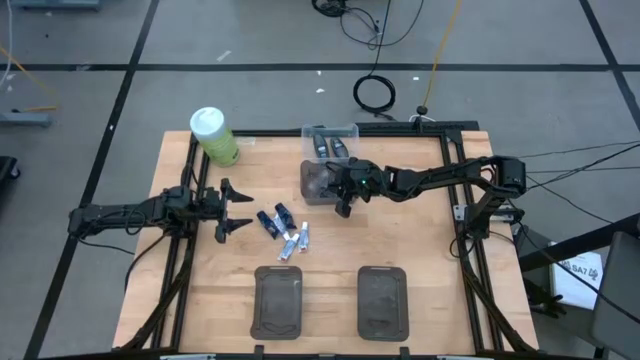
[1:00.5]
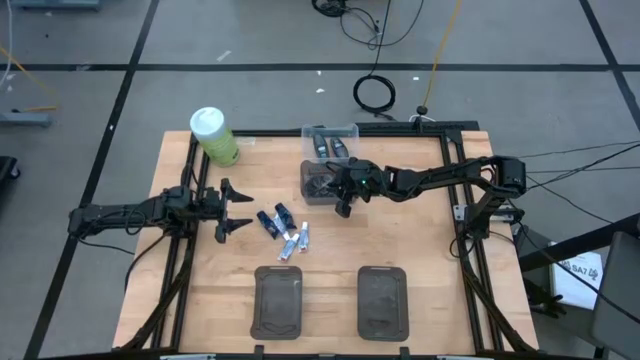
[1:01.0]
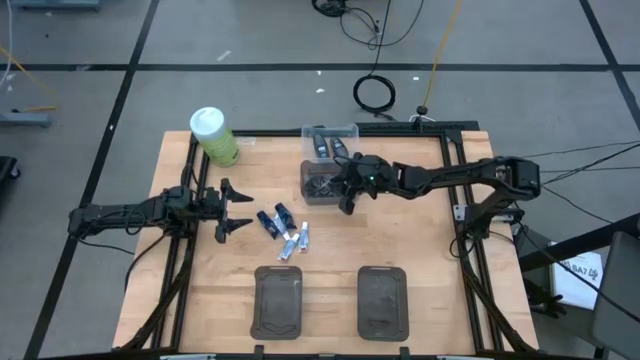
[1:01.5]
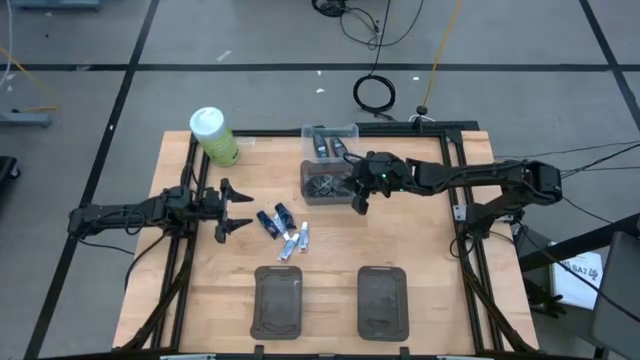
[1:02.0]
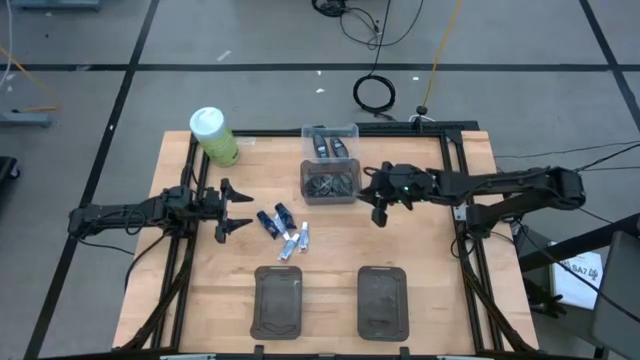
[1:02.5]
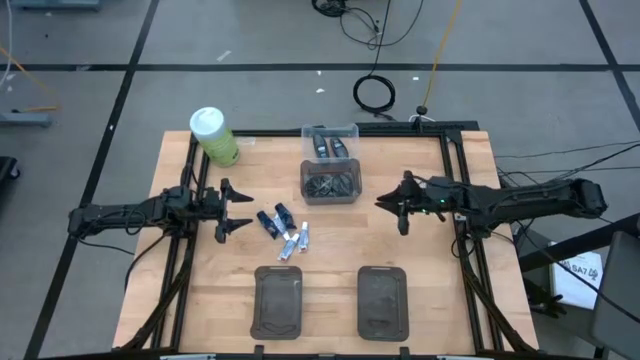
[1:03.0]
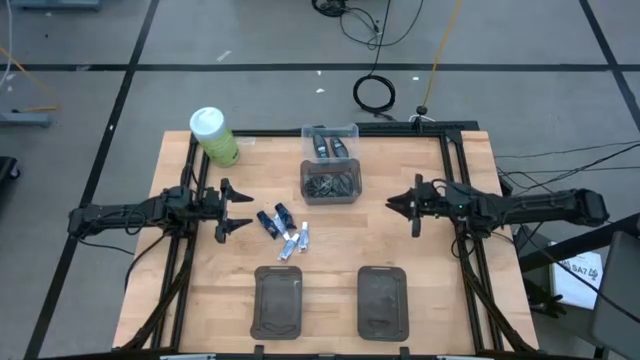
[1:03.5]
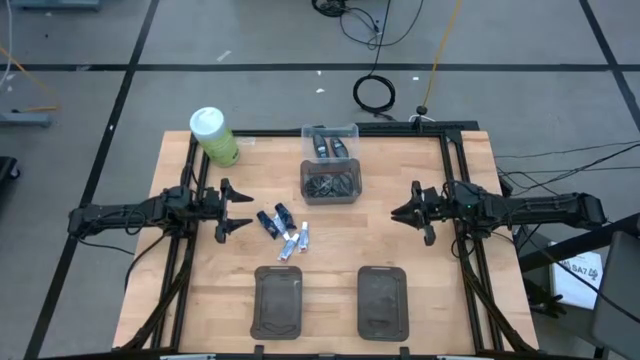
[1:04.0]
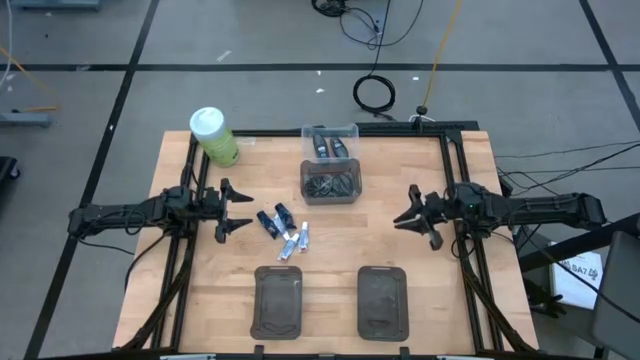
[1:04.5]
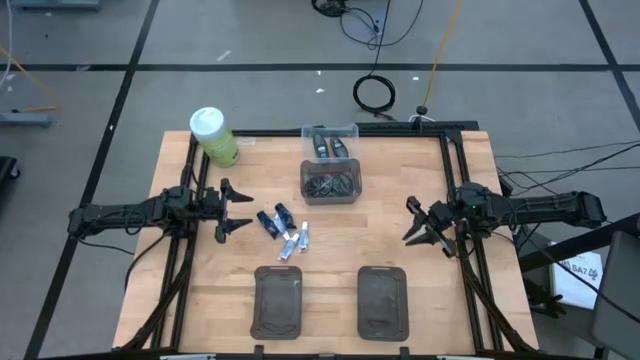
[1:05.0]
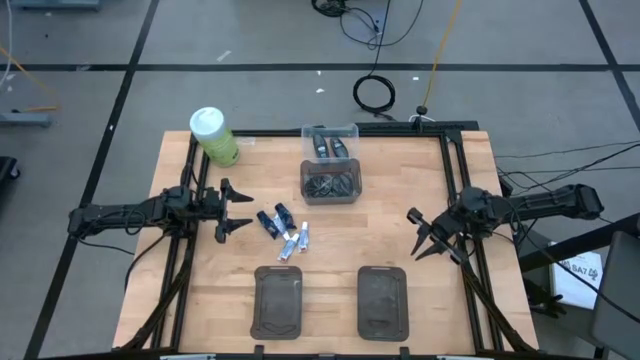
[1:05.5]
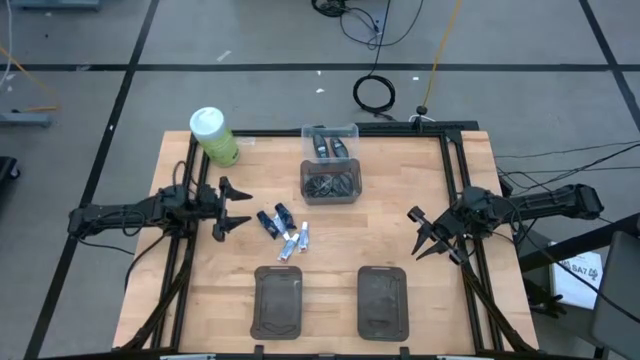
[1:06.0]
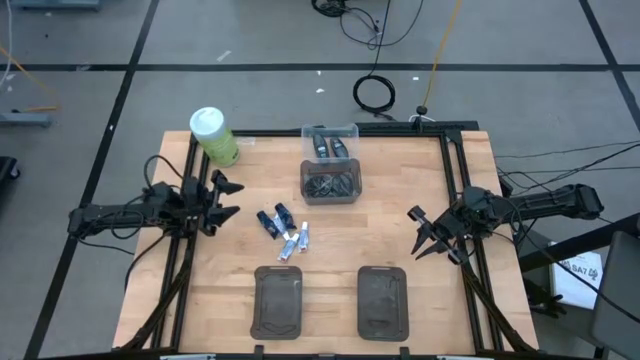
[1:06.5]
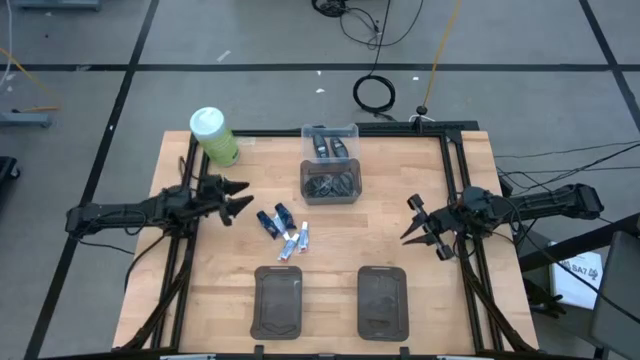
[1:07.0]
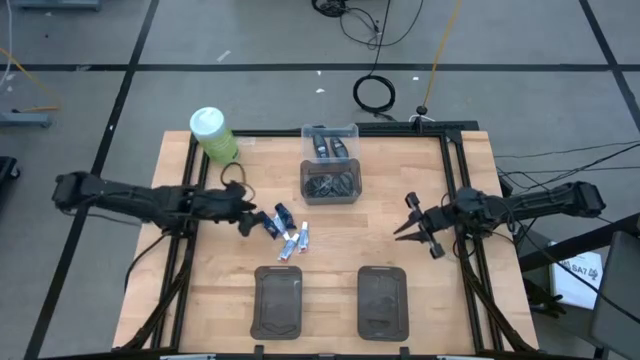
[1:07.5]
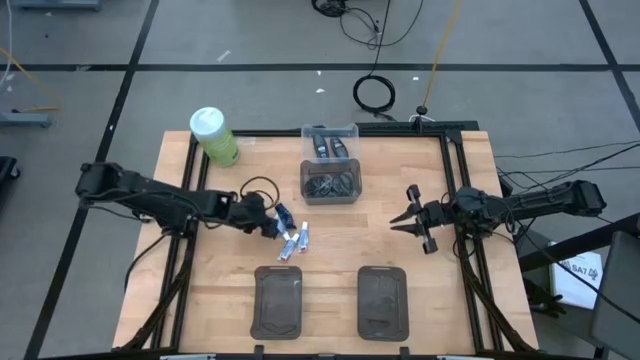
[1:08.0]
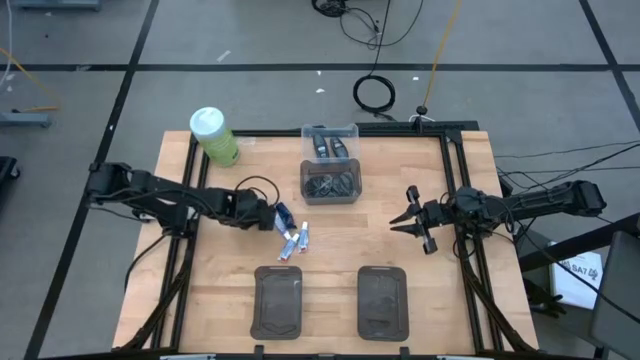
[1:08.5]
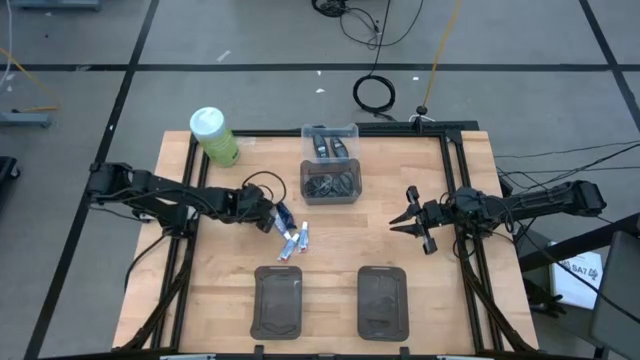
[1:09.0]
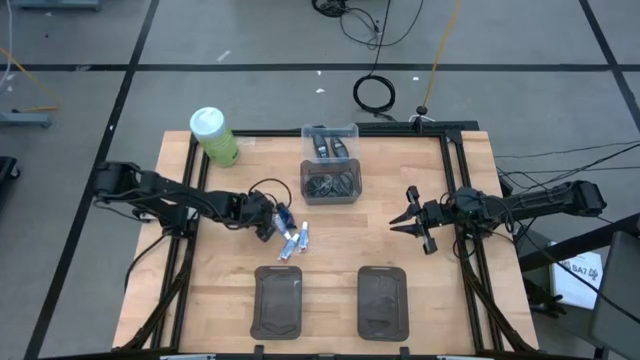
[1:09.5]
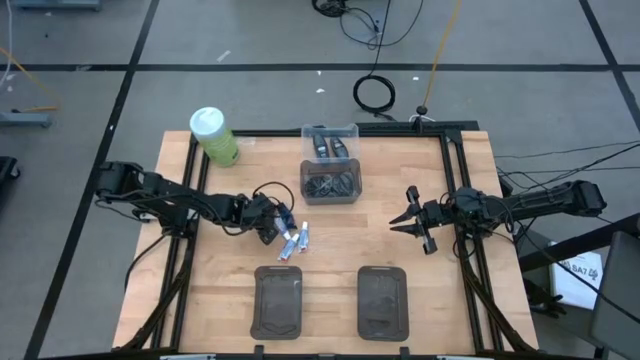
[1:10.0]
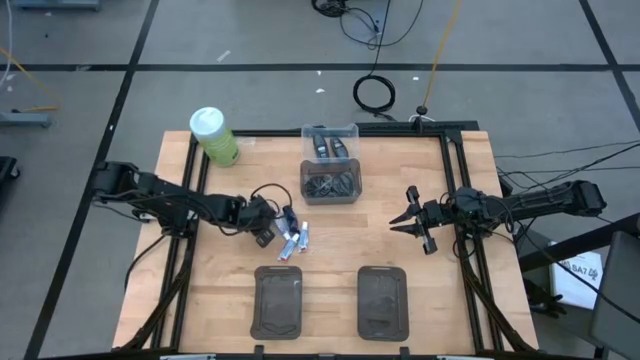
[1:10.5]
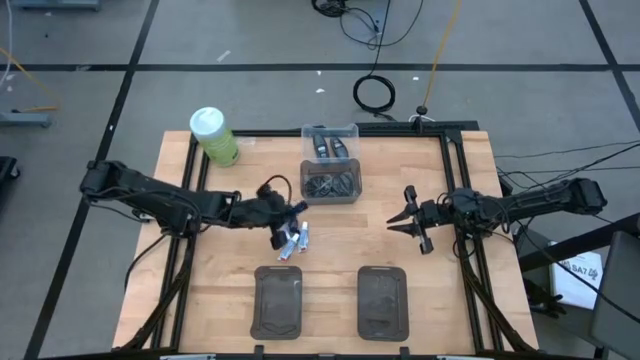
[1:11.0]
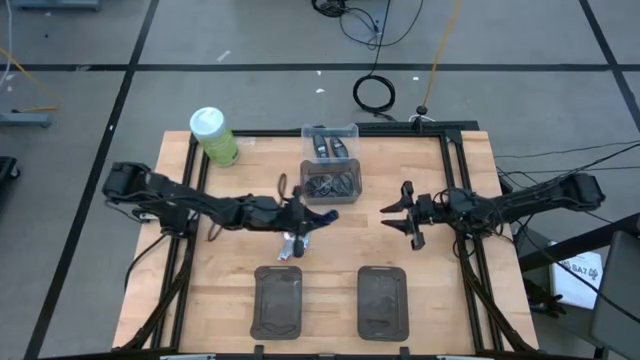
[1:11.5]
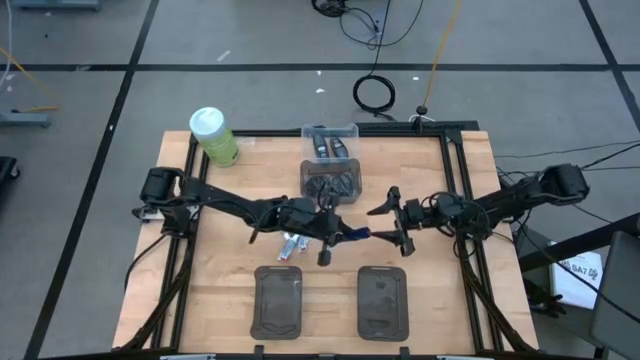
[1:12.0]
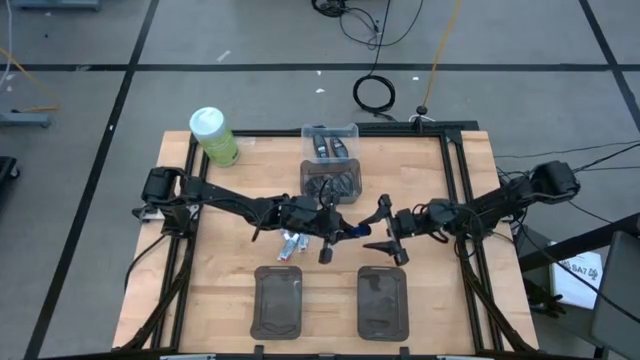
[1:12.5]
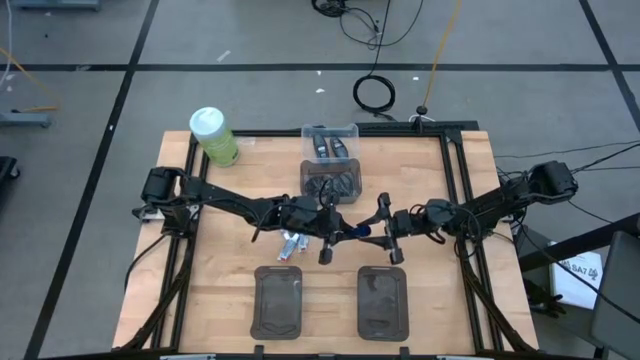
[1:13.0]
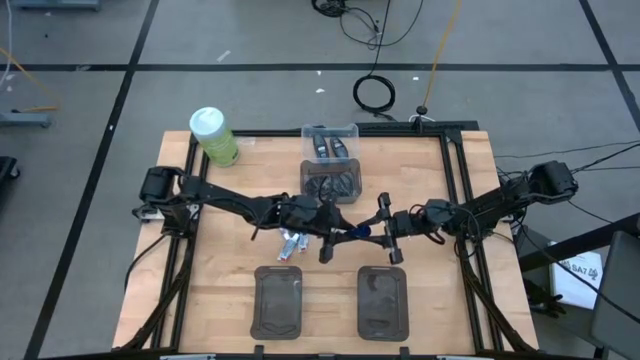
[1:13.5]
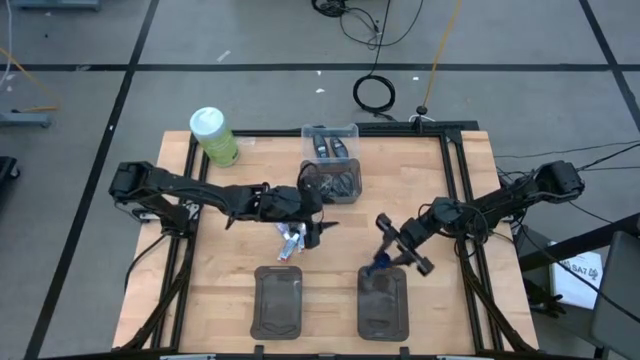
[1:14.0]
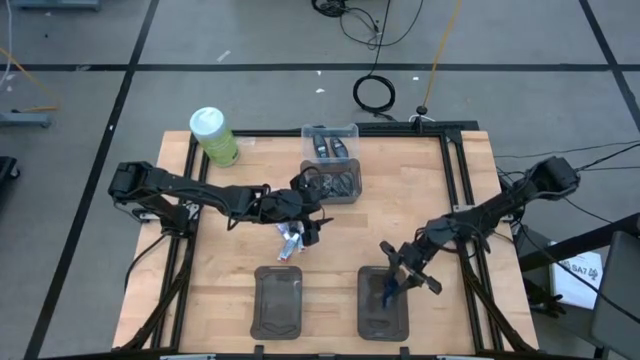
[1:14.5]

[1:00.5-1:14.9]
Task: Pick & Place Travel size toiletries
Put the left blue shave cream into the right black bin

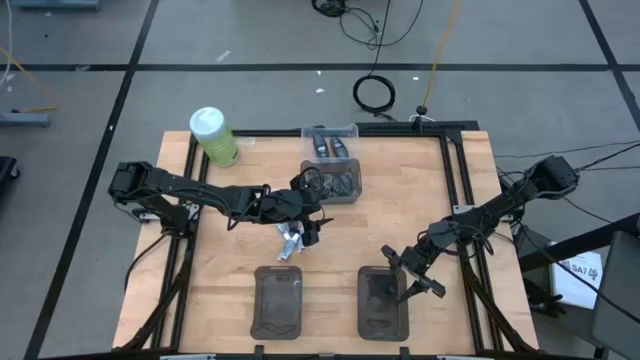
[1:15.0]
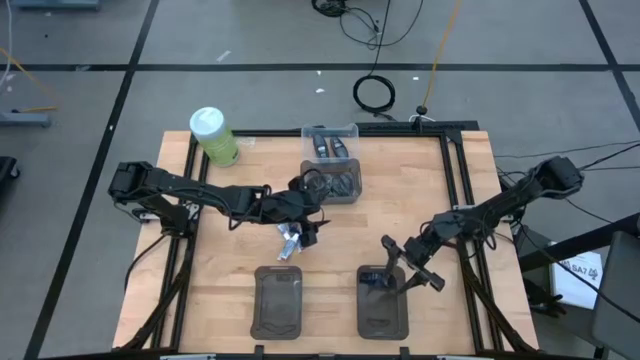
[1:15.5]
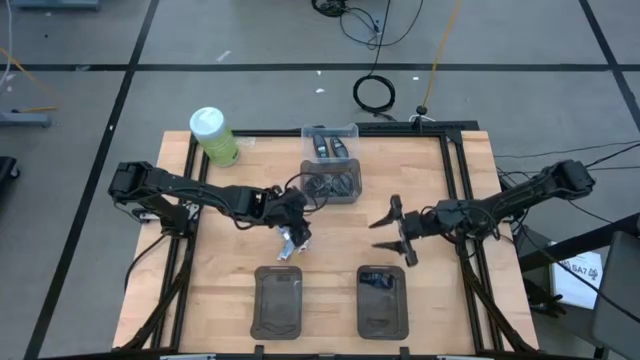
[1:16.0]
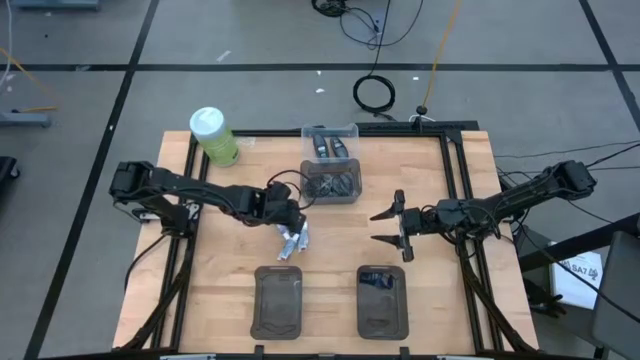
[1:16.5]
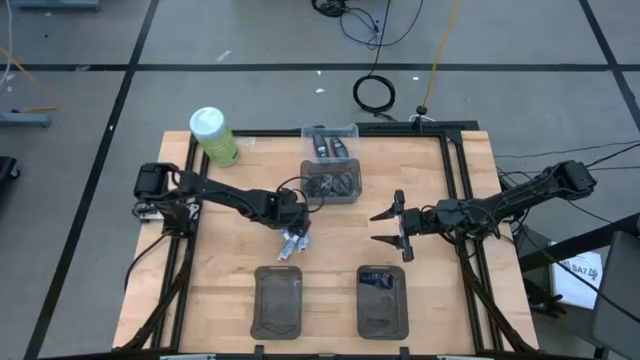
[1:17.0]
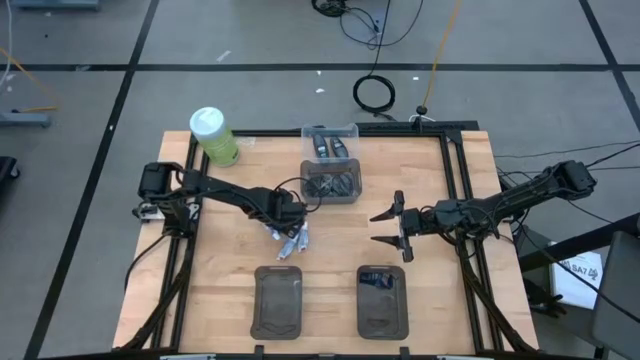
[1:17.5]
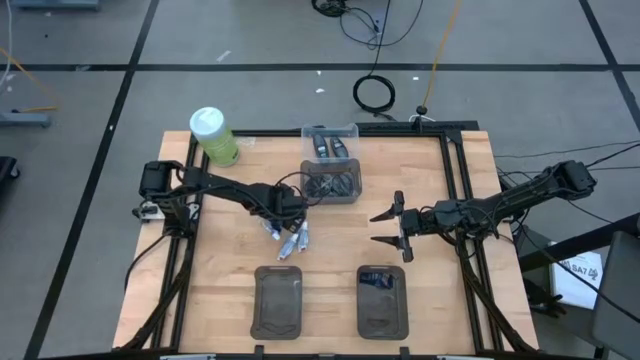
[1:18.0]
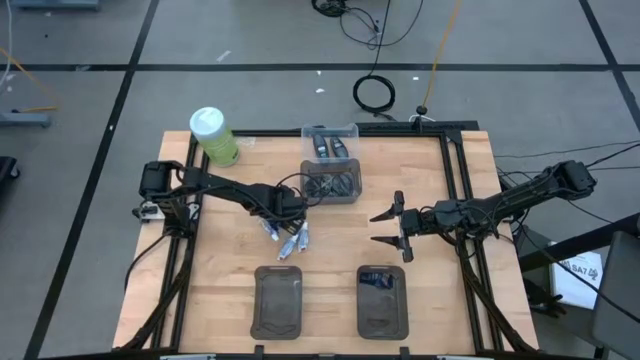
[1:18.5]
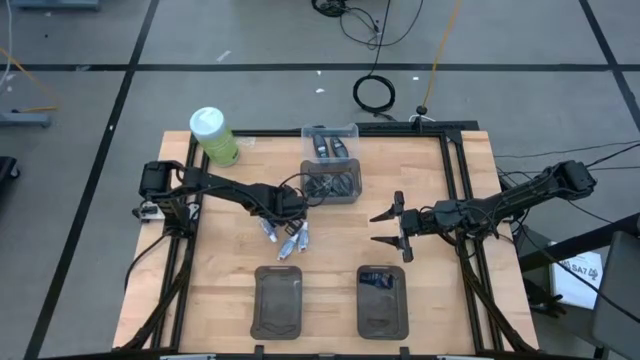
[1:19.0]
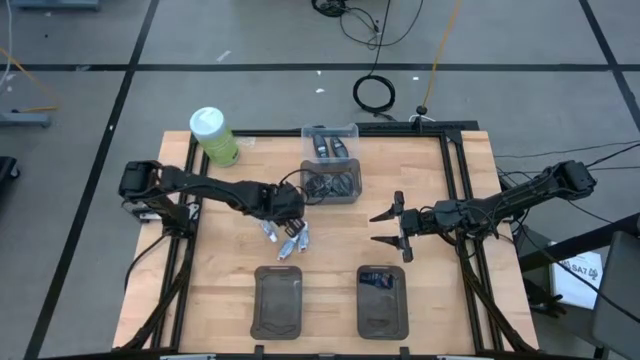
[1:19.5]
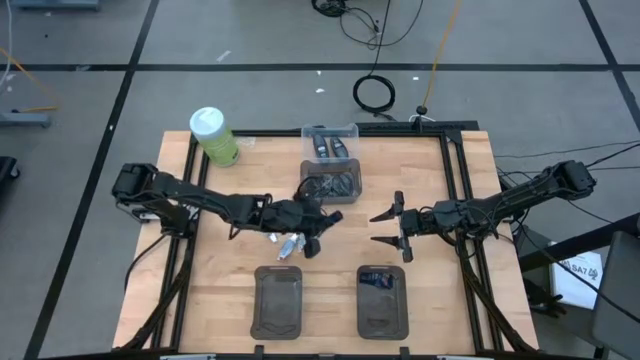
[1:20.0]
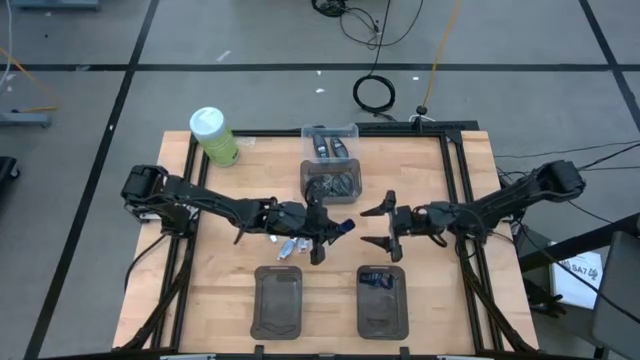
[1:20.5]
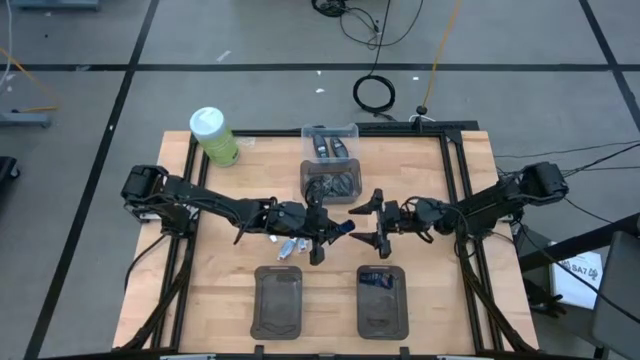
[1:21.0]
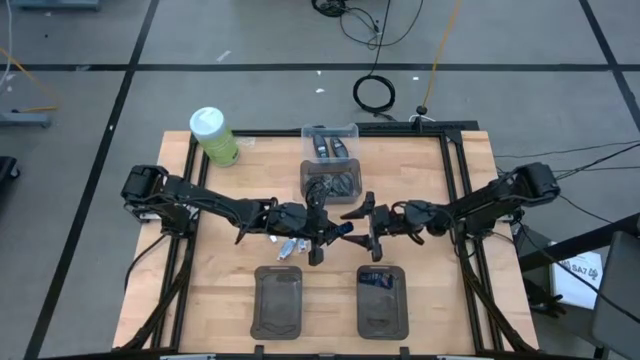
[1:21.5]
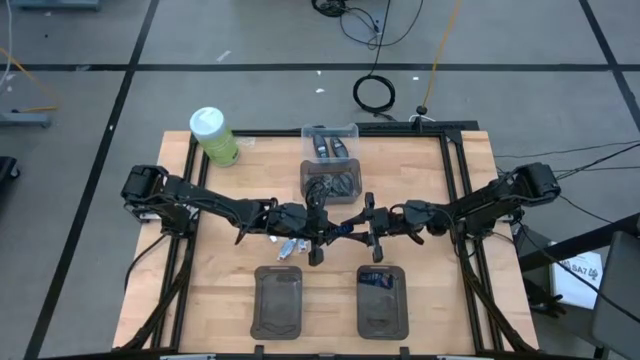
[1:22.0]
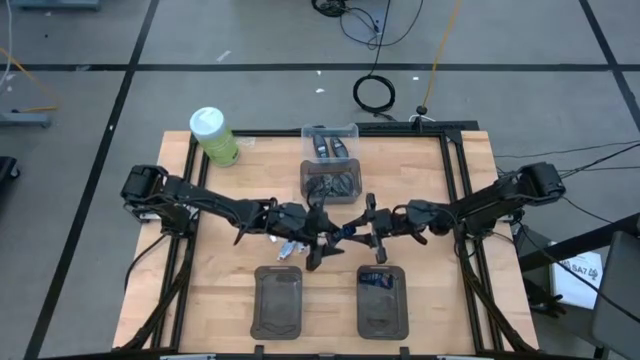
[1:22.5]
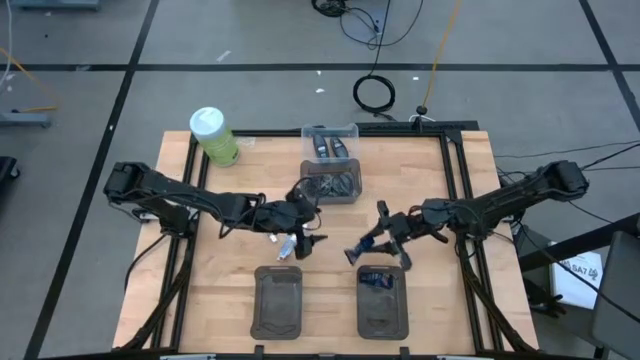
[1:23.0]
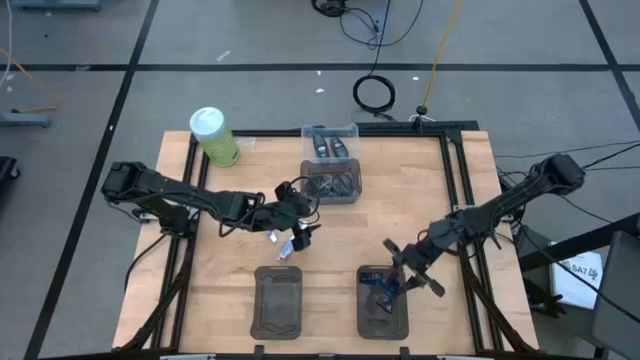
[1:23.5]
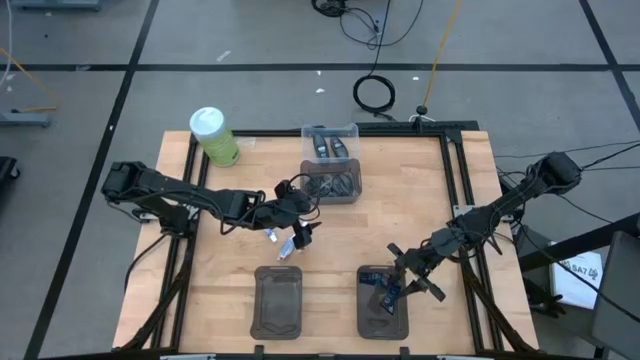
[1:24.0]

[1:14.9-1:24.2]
Put the blue shave cream into the right black bin
